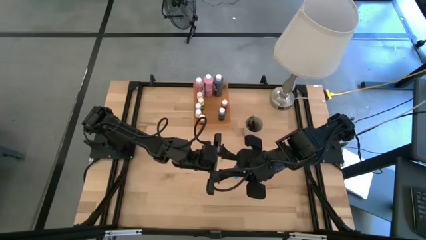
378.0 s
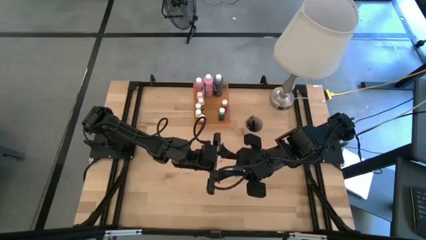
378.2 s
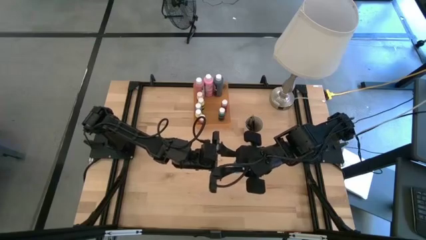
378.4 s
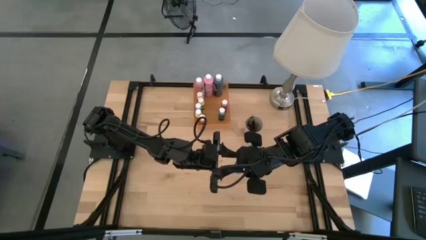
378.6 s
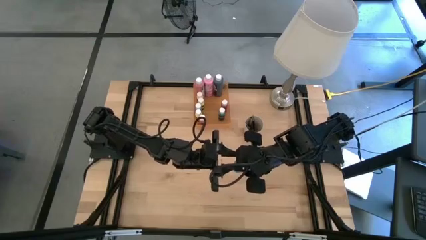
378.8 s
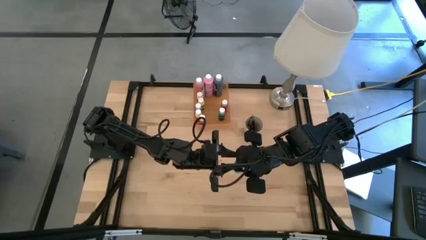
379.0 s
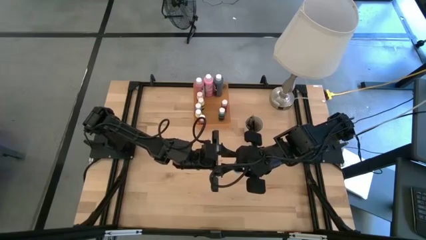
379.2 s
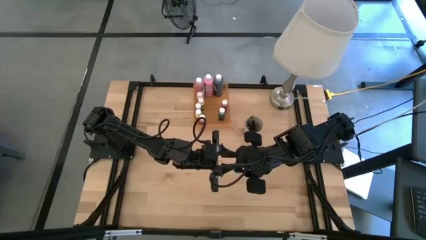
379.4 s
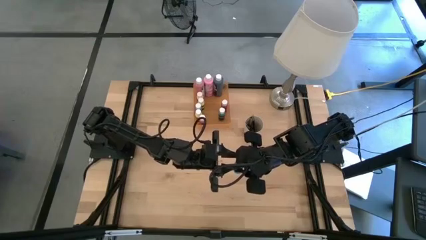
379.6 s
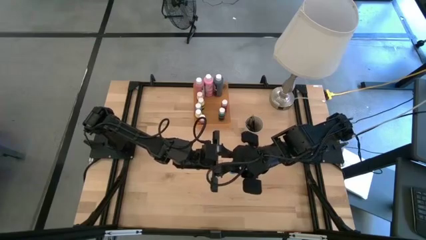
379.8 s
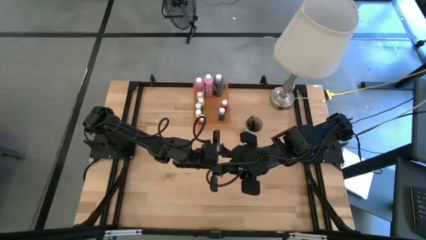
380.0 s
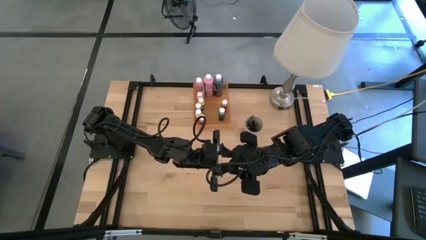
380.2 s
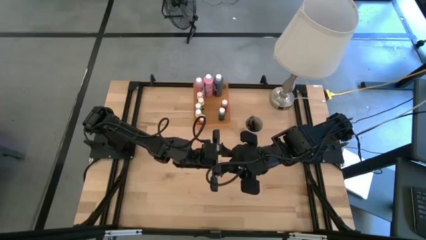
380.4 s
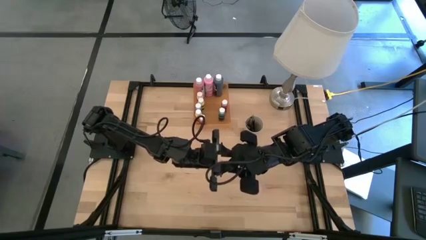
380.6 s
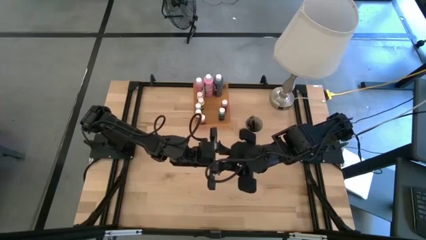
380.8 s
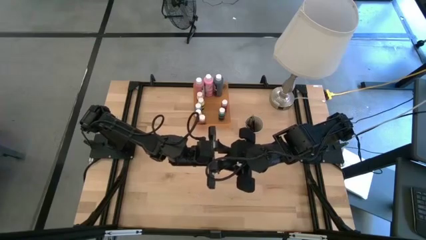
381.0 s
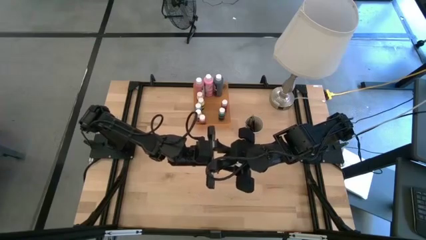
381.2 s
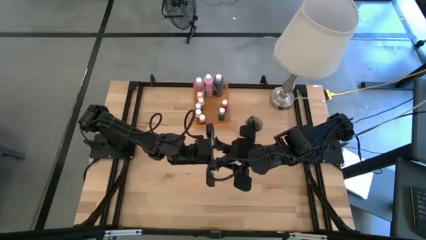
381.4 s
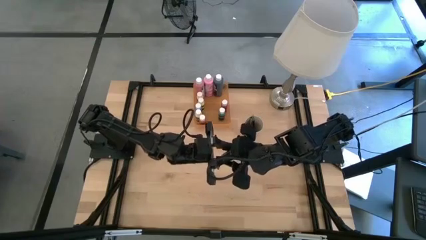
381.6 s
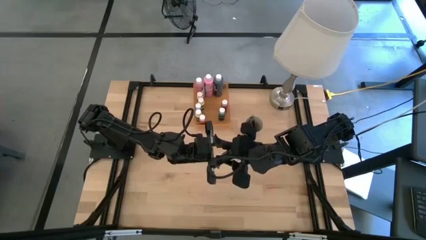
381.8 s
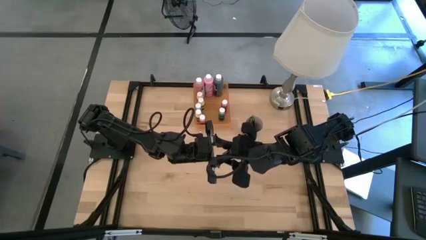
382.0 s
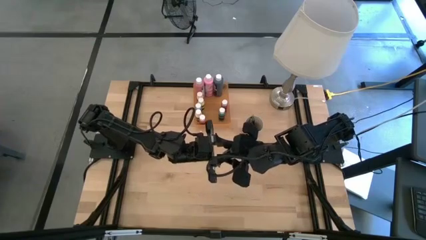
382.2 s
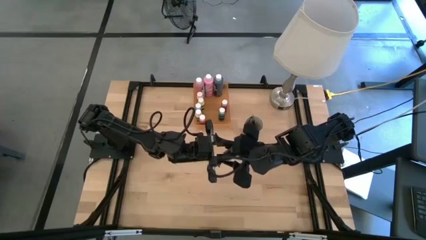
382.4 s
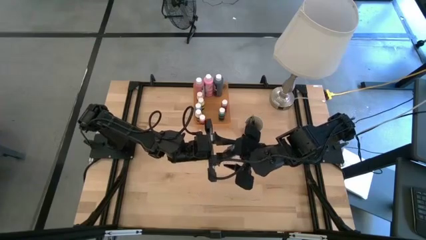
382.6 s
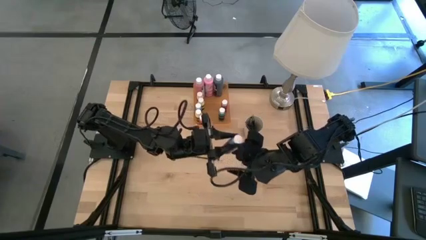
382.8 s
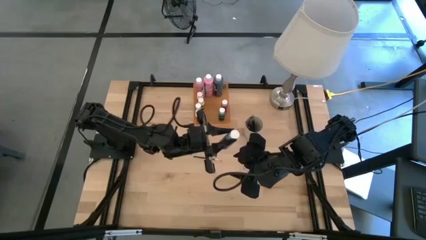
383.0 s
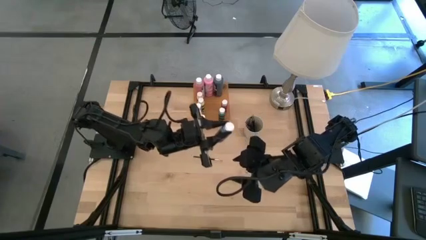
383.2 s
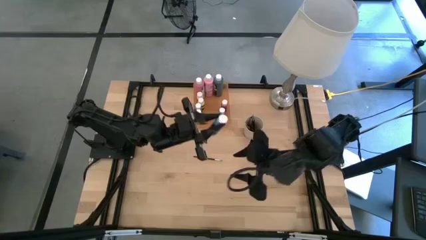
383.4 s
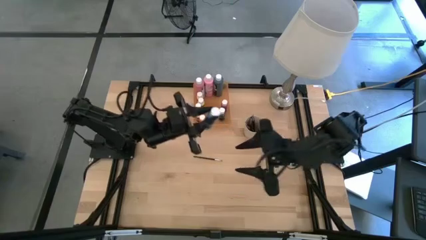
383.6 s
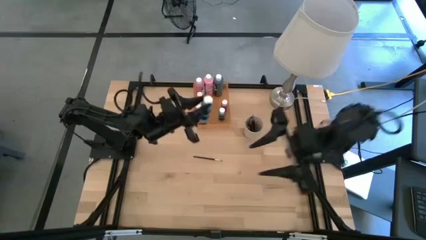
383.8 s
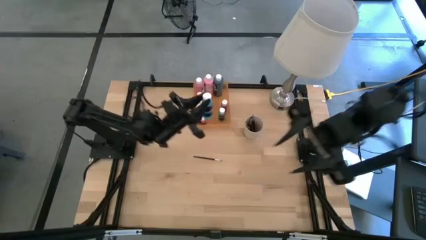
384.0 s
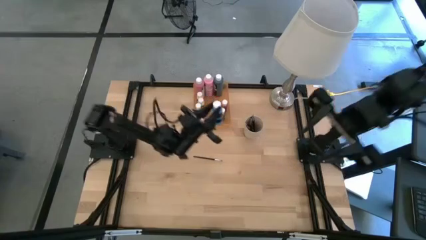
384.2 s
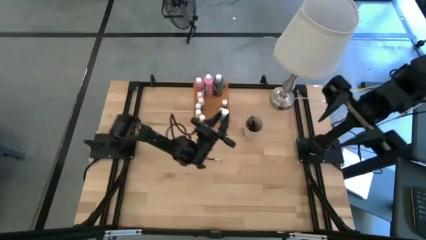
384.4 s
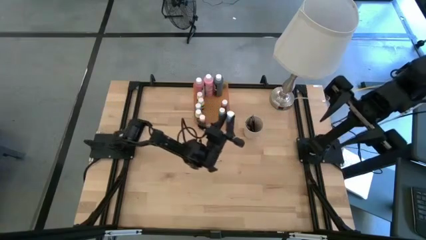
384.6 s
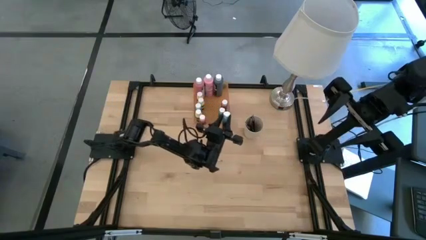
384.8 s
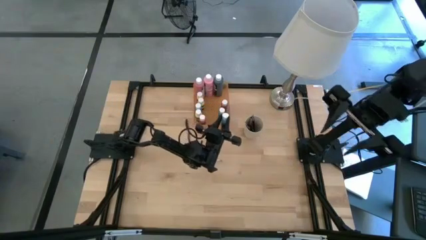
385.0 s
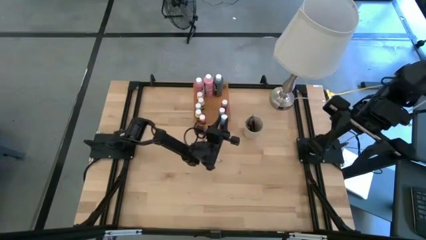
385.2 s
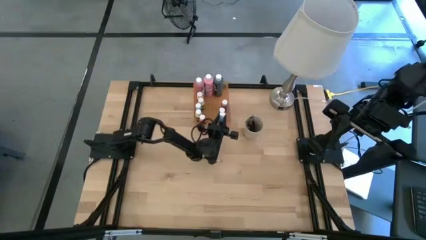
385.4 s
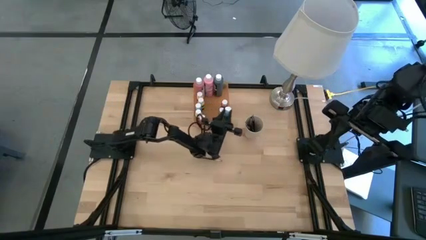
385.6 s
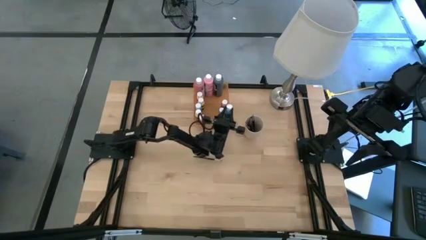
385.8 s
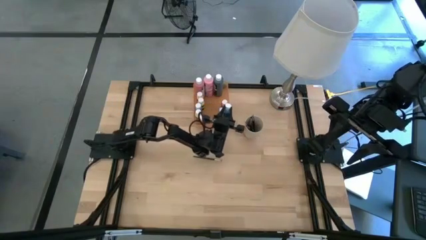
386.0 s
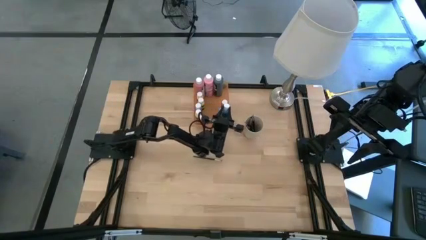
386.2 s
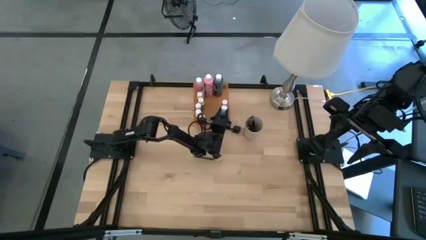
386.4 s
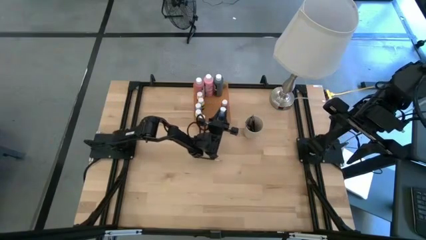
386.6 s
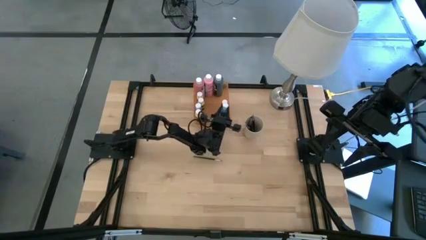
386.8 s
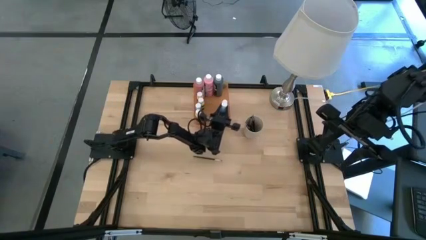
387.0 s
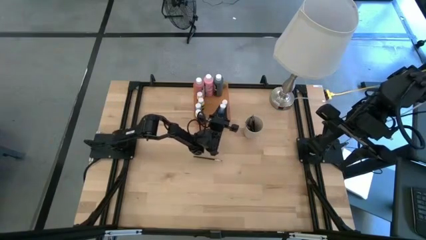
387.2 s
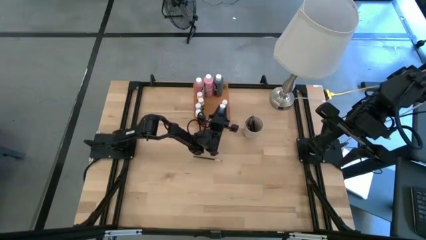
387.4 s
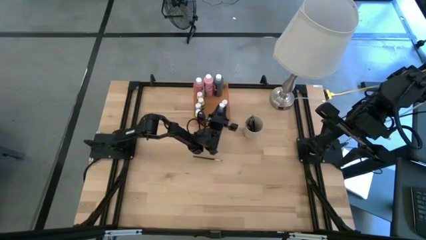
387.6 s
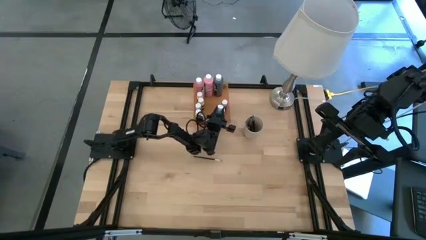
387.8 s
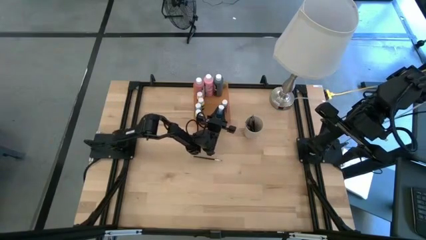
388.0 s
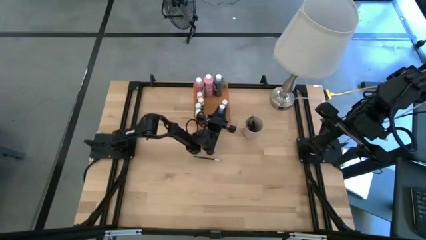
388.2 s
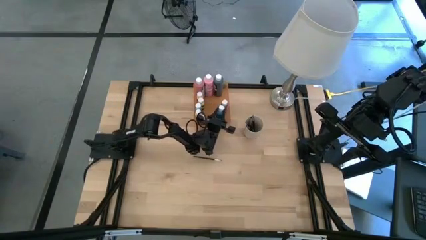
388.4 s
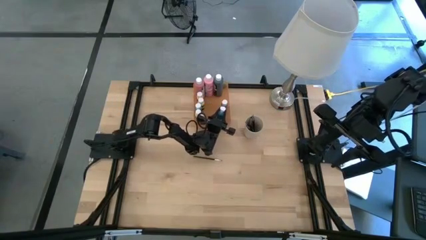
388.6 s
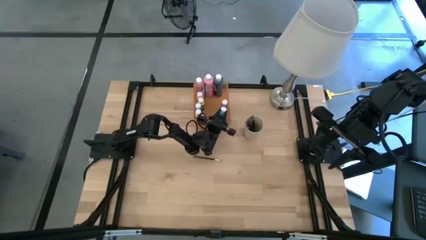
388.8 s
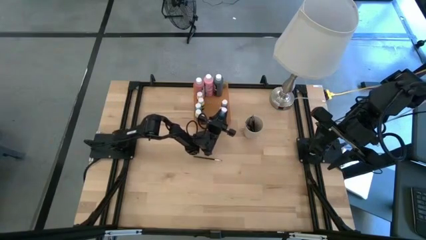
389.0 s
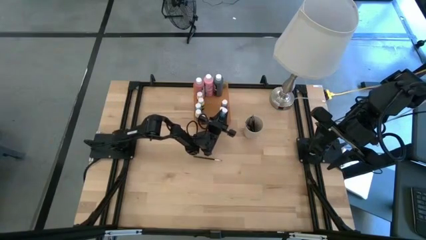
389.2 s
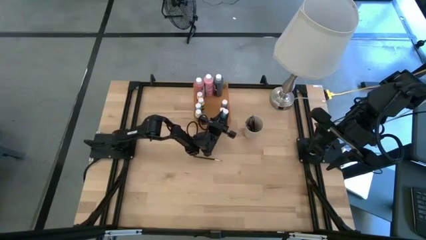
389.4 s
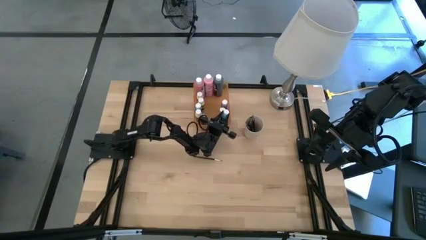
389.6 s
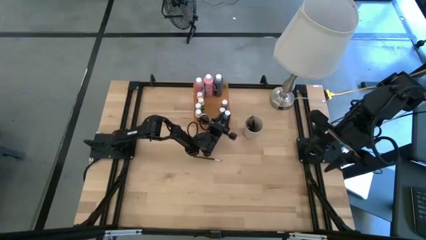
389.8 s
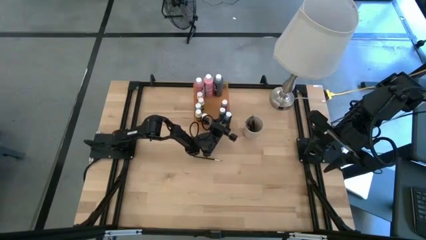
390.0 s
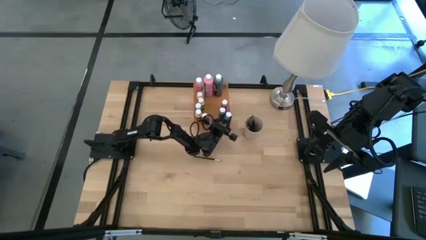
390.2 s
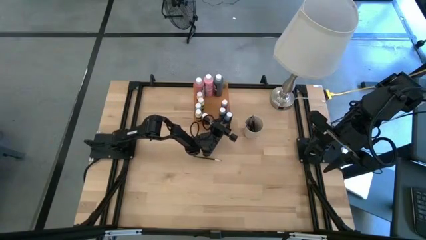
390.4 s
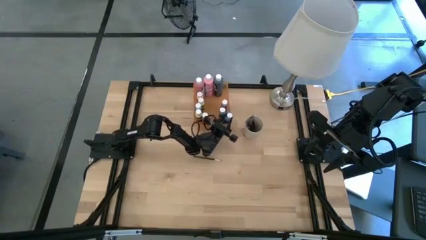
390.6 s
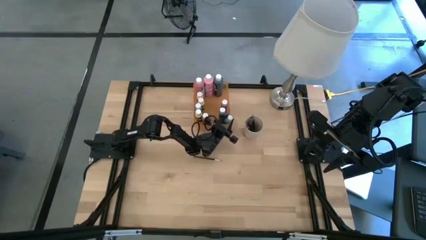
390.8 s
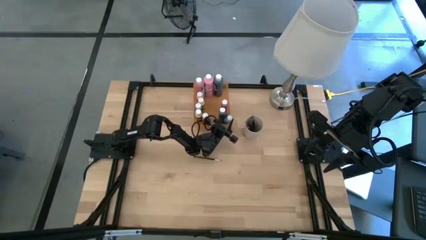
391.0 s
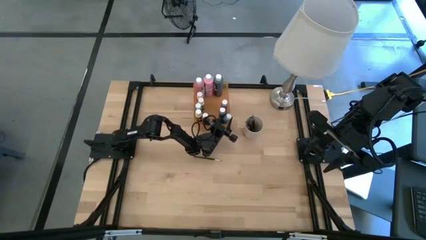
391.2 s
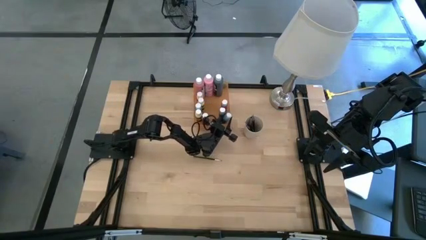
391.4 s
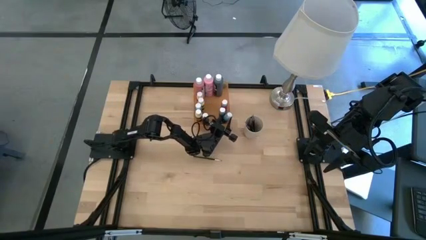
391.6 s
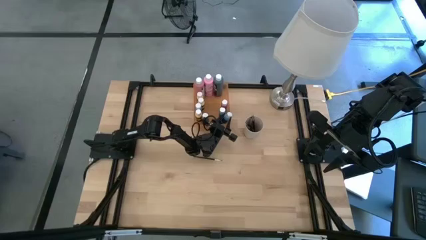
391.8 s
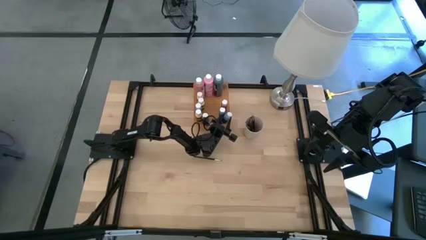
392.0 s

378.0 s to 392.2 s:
Task: Pick & Place Paint Supplies
Put the blue paint bottle into the orange bin

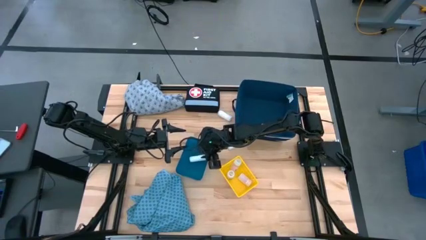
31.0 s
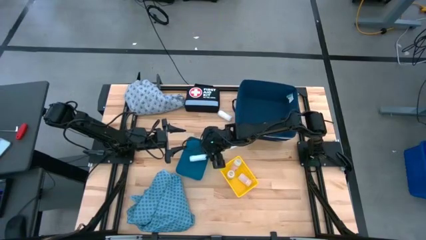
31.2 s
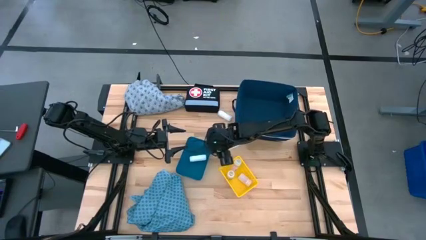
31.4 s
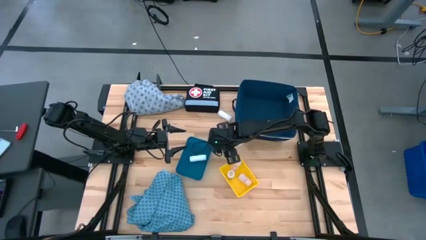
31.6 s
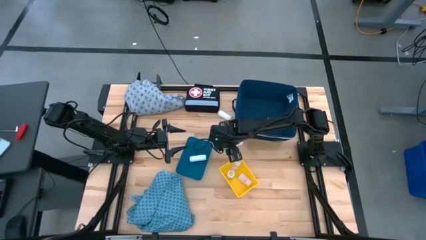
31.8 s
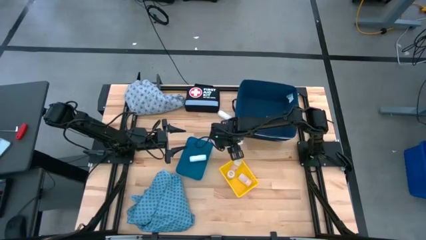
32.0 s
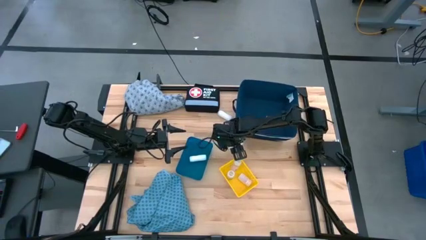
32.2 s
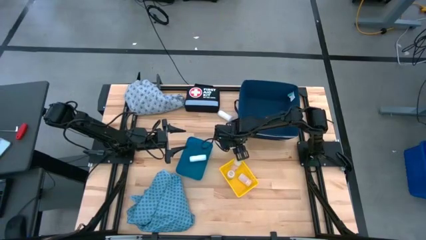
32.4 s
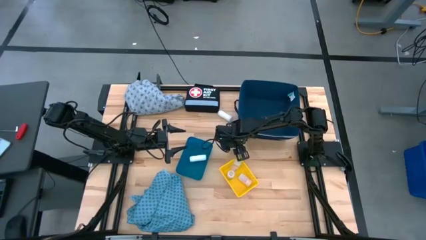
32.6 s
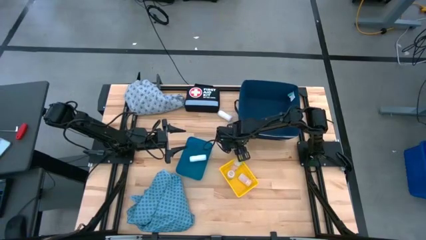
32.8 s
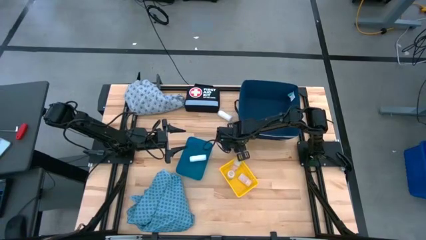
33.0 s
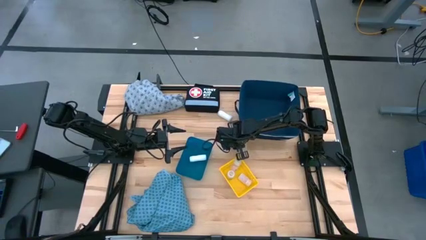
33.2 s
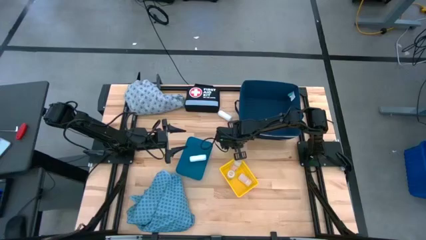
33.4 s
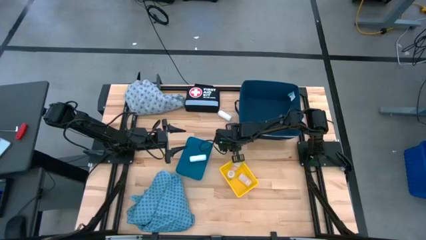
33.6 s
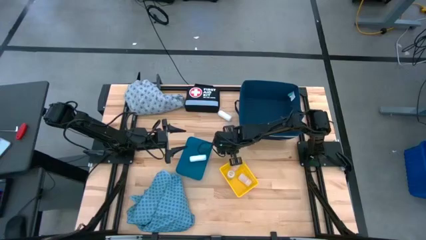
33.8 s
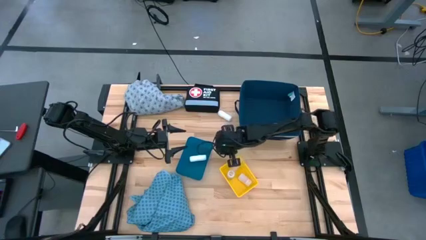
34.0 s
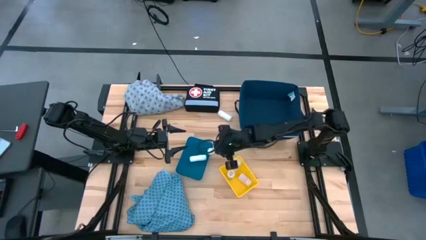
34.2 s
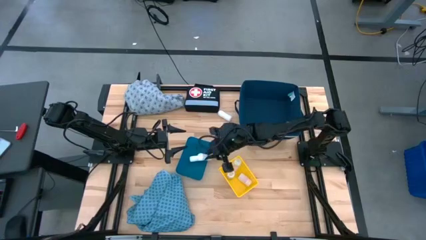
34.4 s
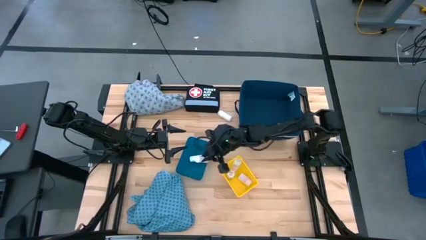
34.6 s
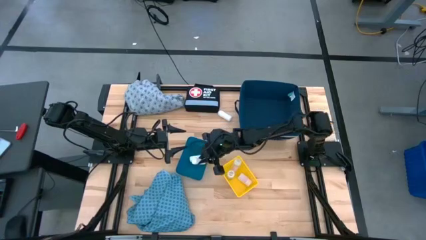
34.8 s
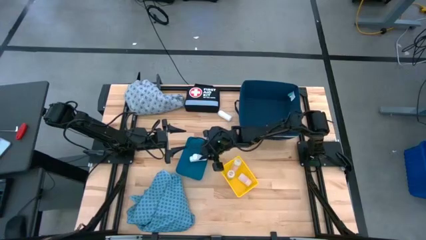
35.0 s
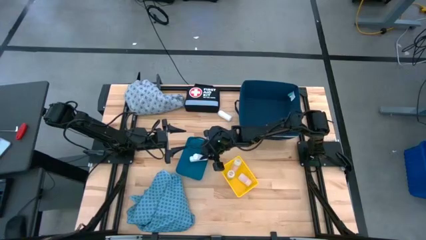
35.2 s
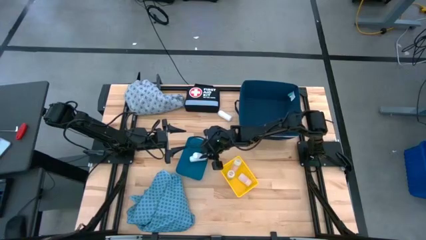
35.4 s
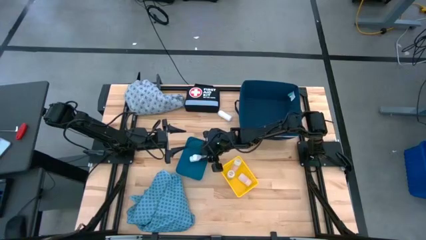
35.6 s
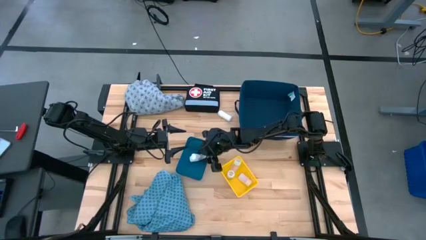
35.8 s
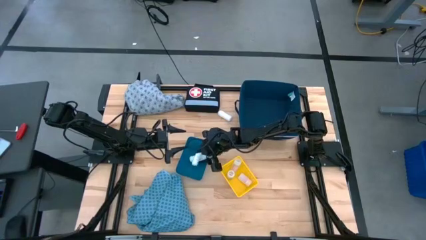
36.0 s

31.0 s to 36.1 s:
Task: Pick & place medical supplies in basket/bin
Put the bottom rolled gauze into the blue bin
